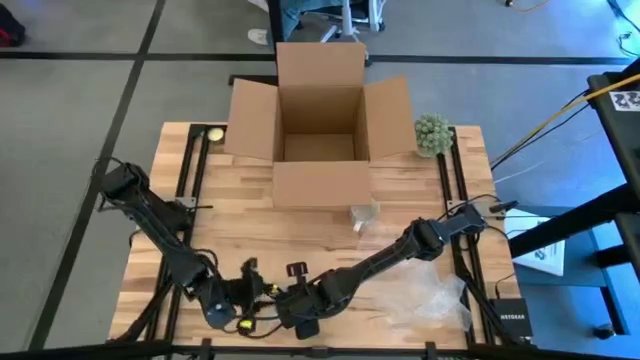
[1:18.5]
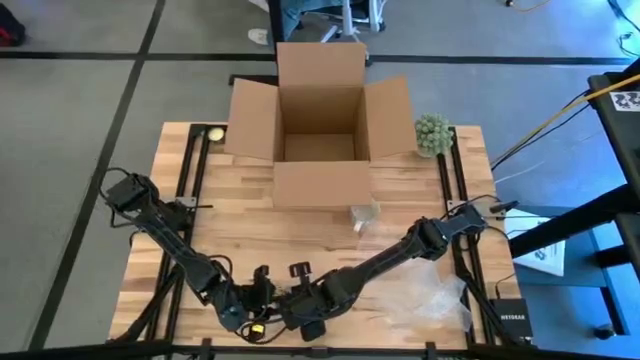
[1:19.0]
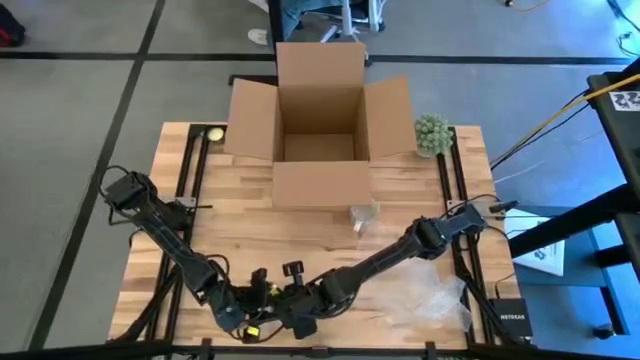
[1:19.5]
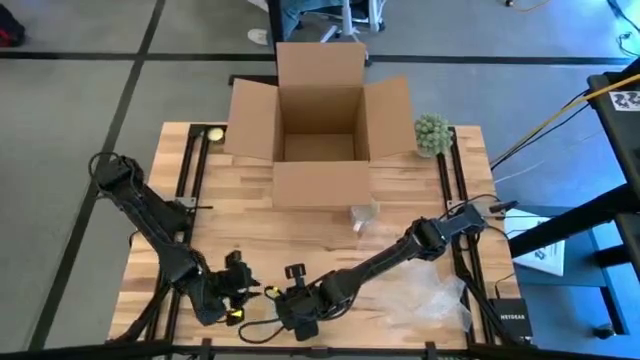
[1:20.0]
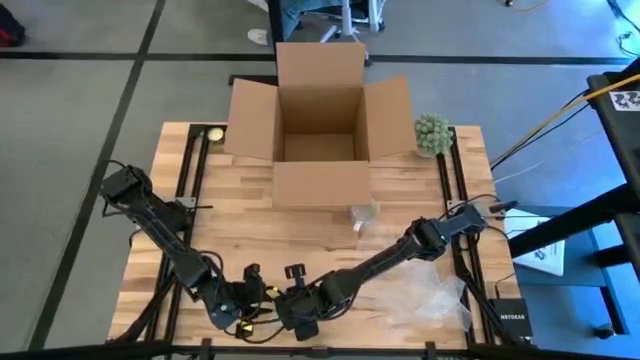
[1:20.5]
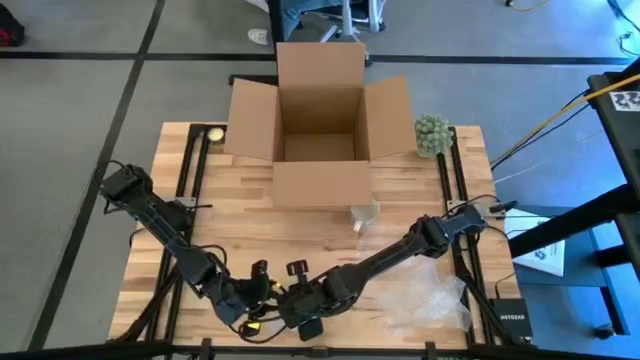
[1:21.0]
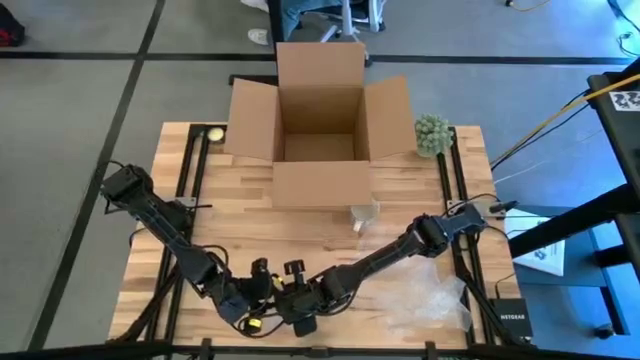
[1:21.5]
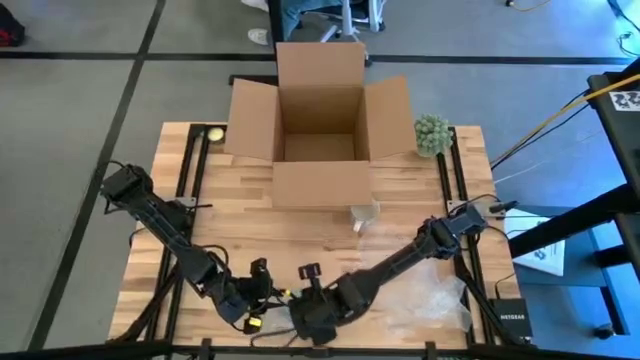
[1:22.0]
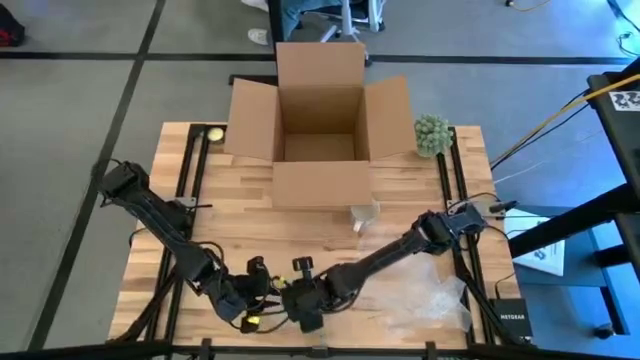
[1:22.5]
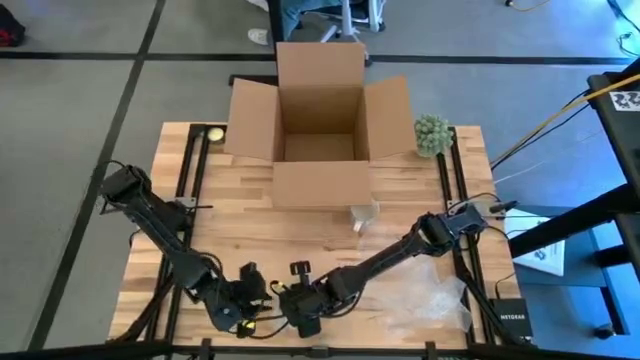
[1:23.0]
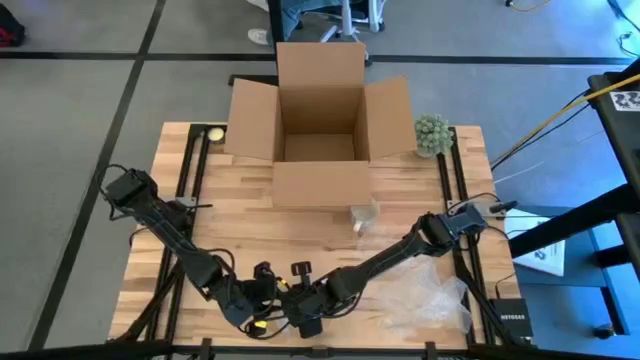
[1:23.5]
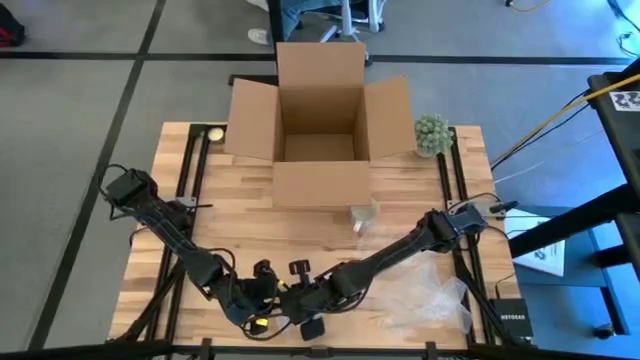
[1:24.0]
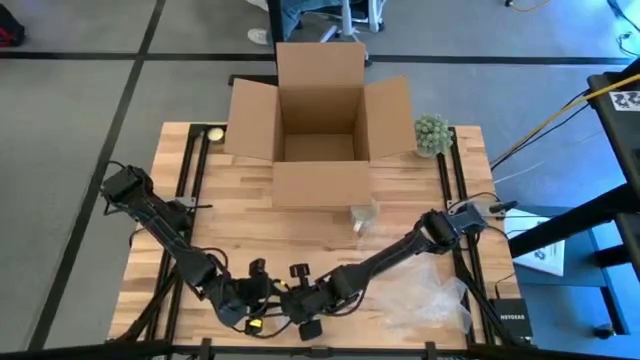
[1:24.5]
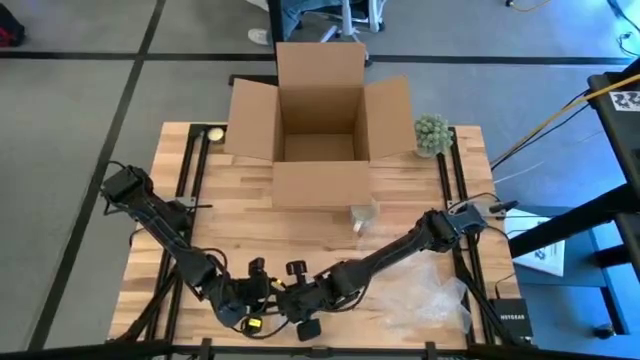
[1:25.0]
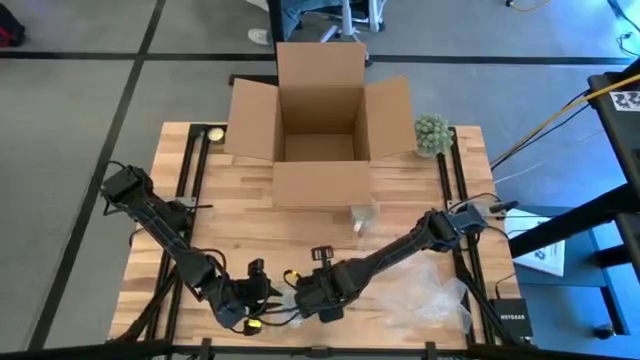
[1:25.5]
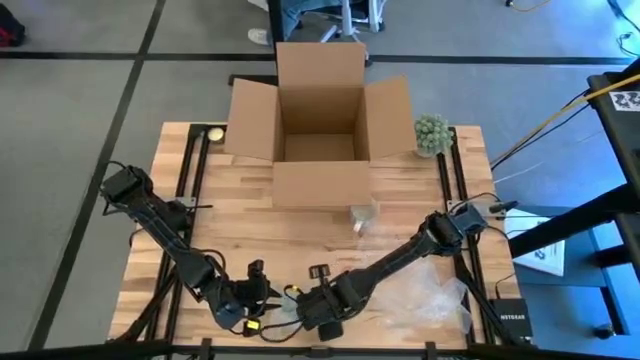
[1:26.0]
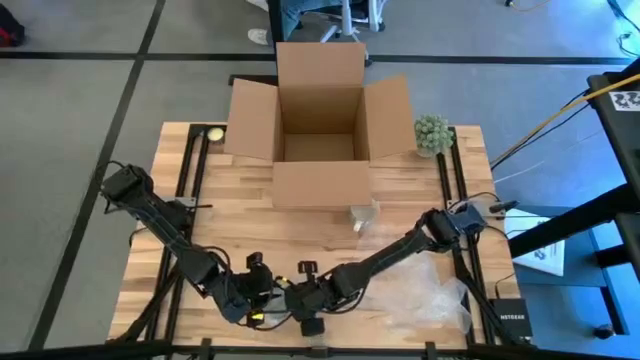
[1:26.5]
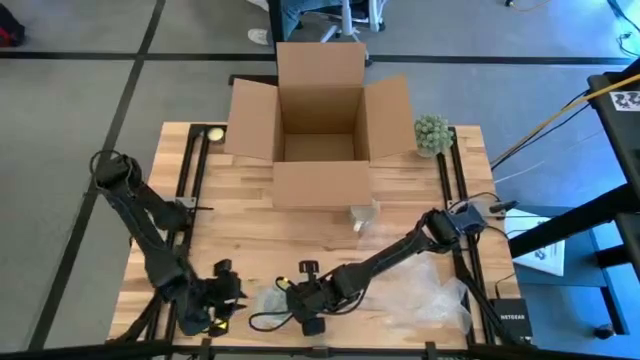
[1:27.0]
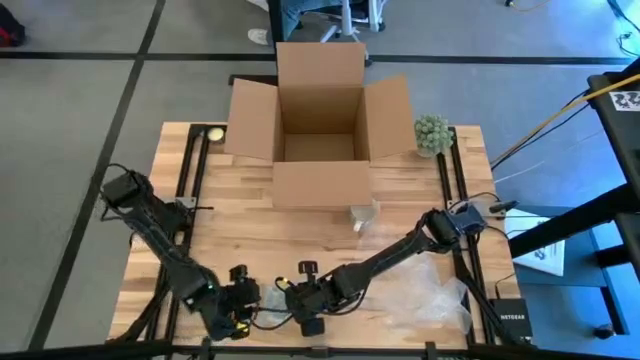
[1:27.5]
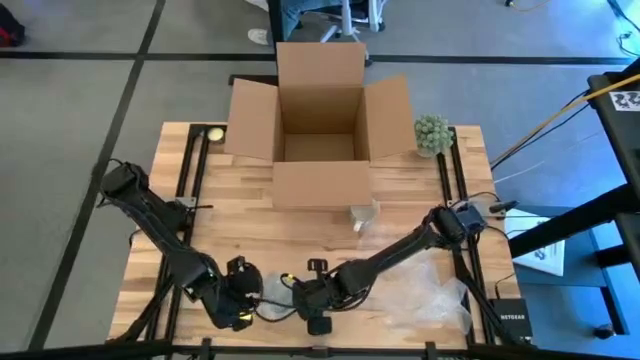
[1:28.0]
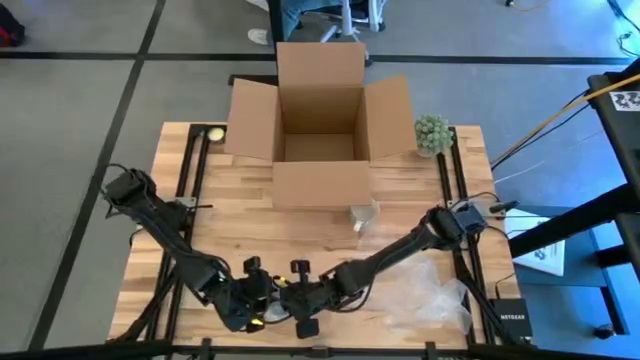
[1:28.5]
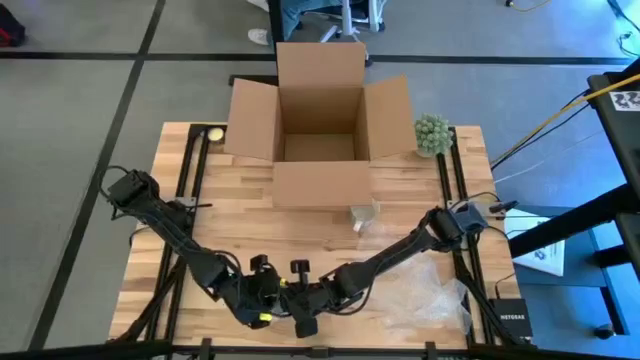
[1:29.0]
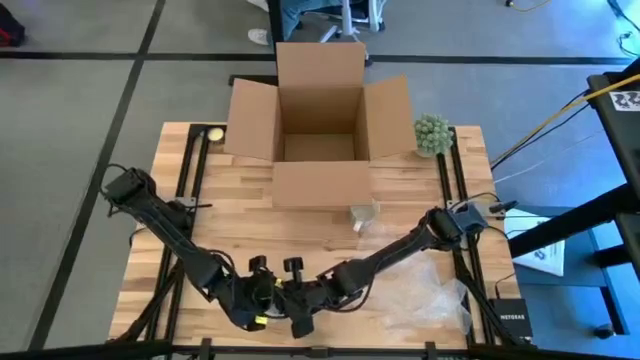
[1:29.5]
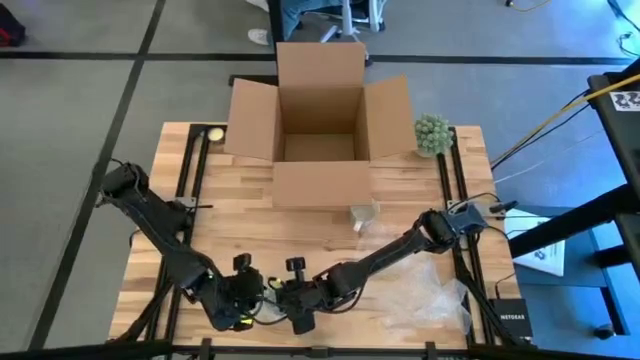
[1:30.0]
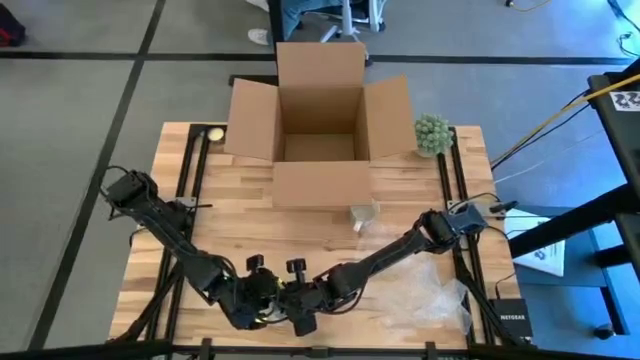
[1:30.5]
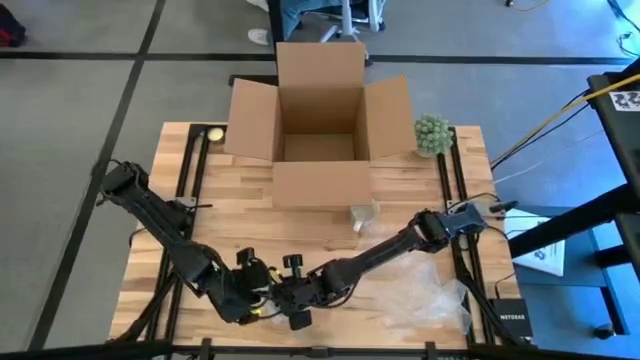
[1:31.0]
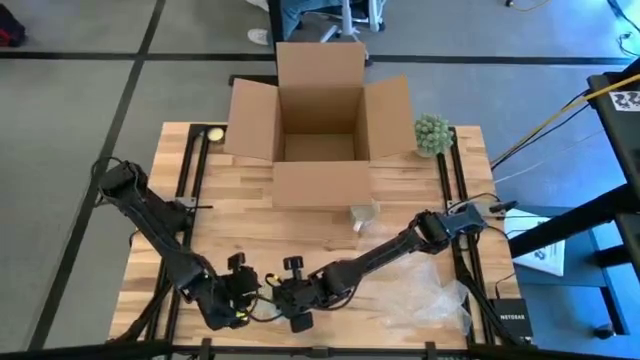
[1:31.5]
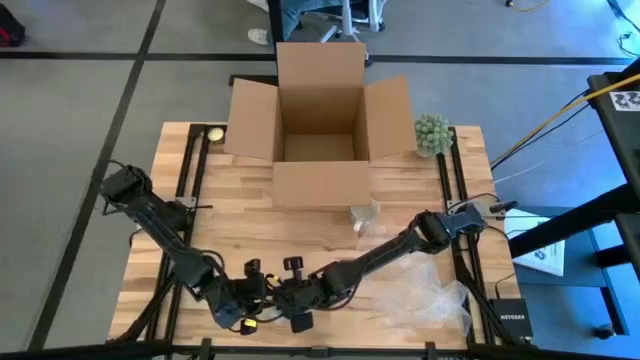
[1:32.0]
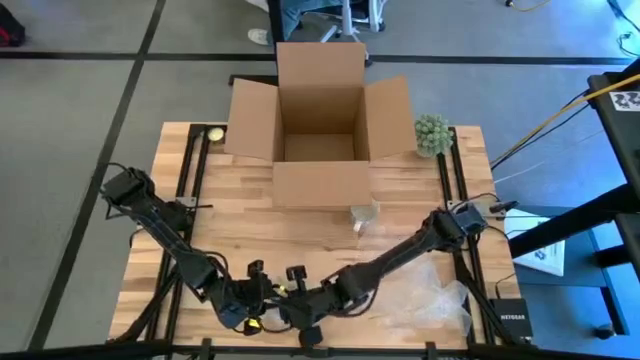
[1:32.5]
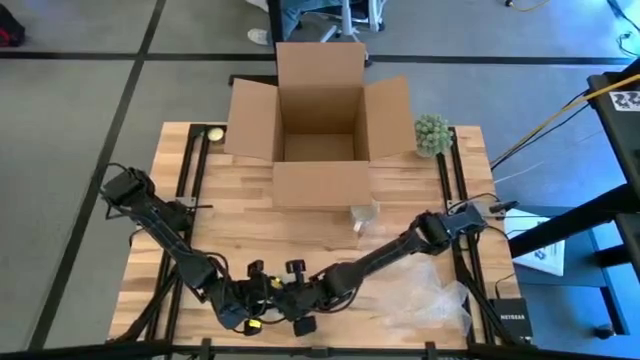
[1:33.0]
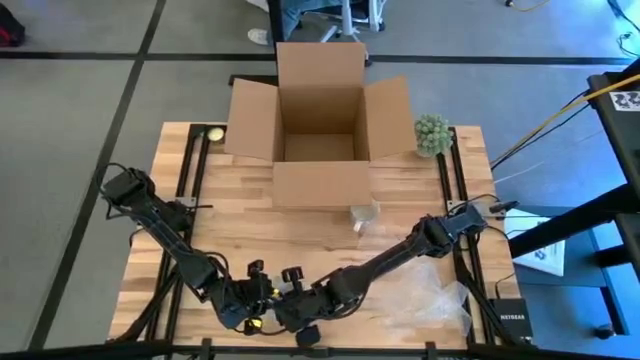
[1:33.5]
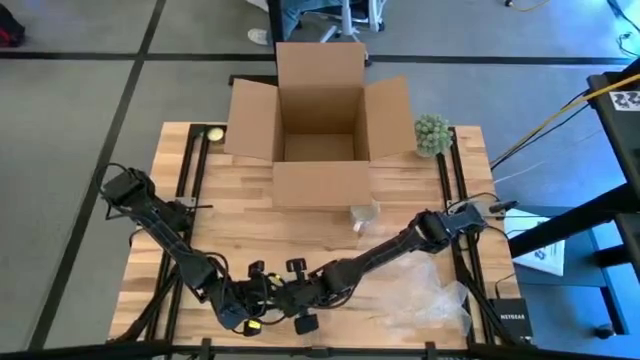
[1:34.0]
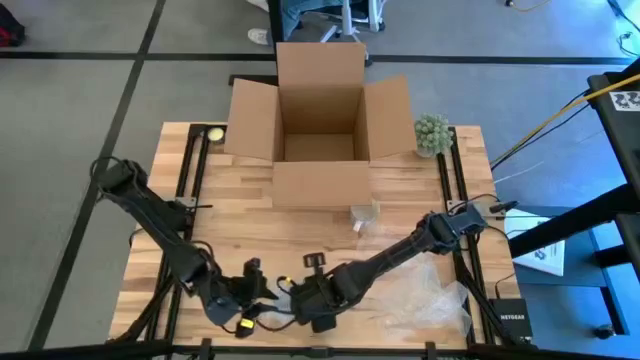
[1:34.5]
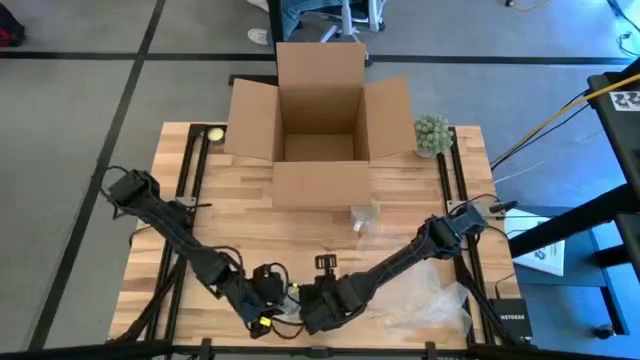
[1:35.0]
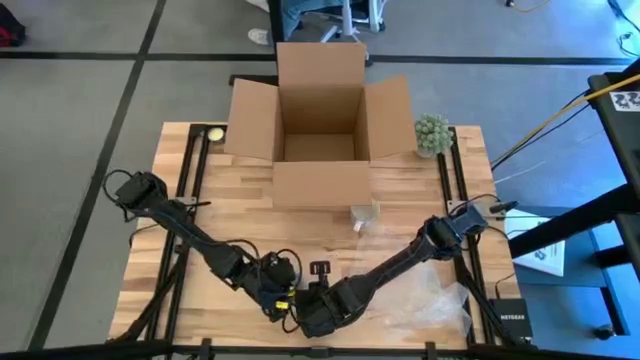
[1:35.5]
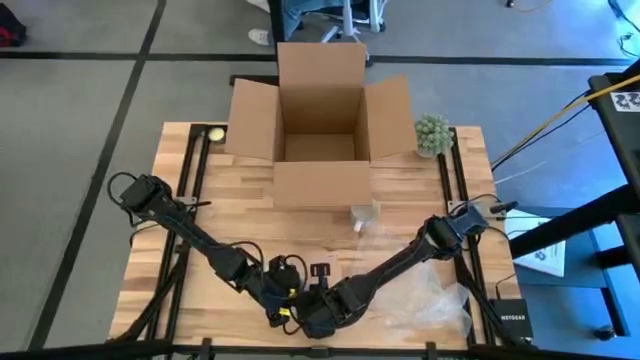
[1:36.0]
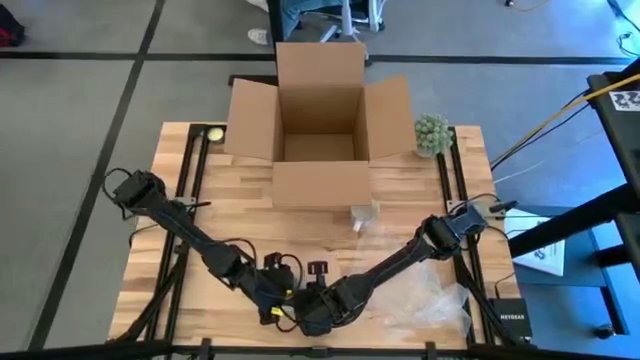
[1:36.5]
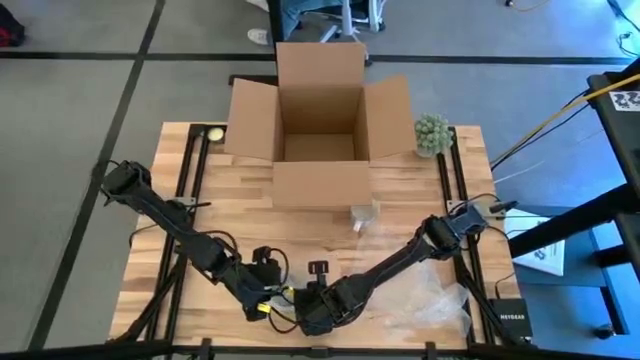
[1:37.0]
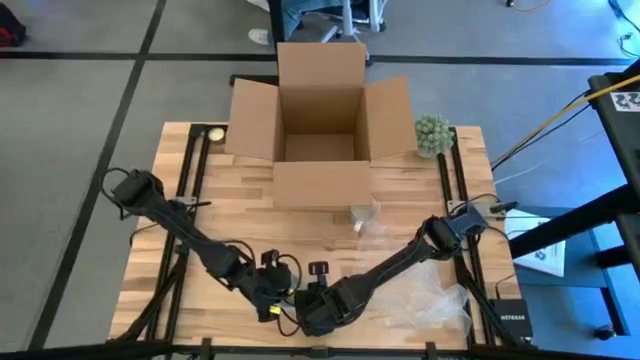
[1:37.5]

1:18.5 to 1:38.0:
Task: wrap mug
Wrap the green mug with bubble wrap

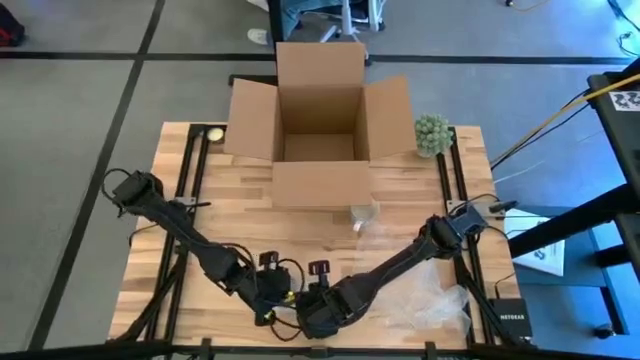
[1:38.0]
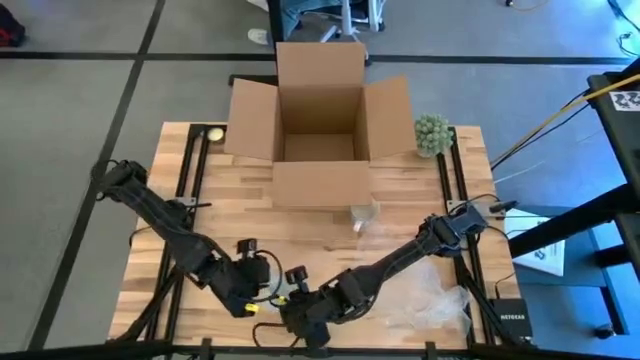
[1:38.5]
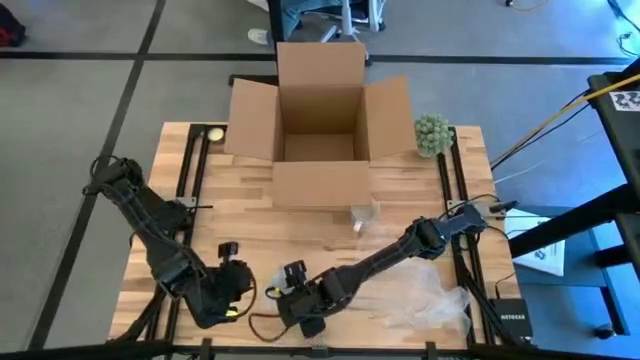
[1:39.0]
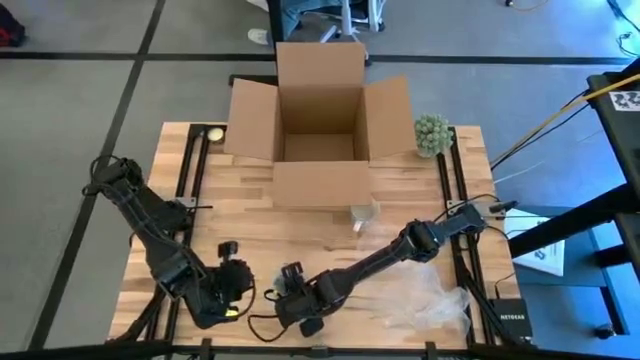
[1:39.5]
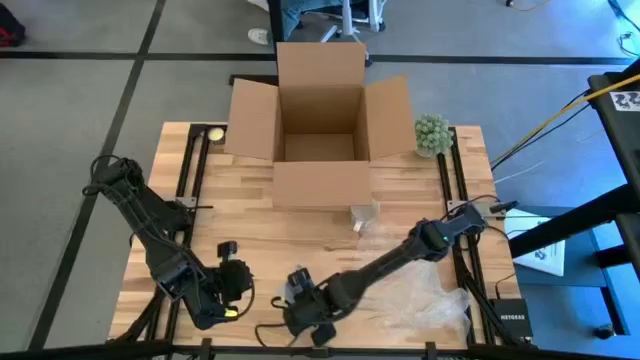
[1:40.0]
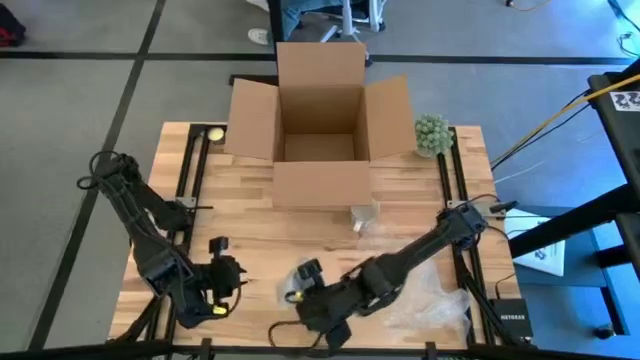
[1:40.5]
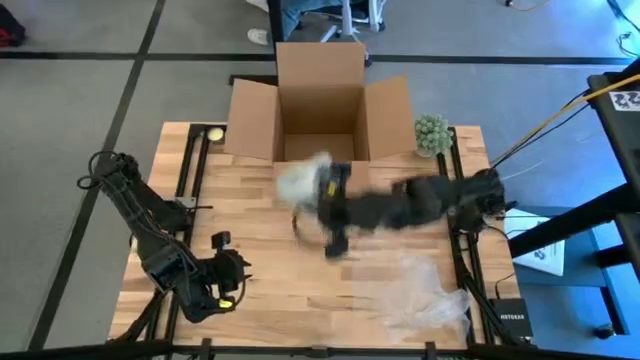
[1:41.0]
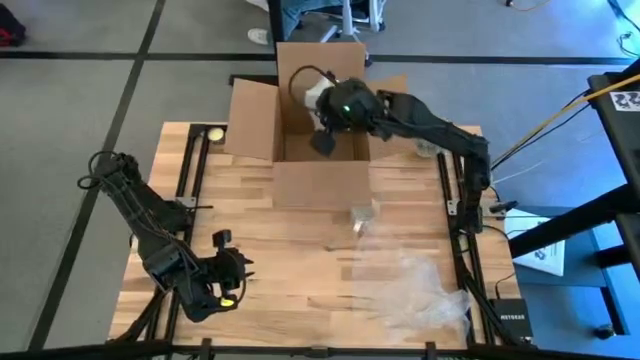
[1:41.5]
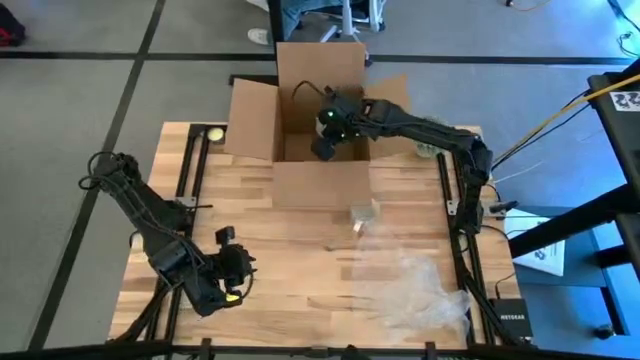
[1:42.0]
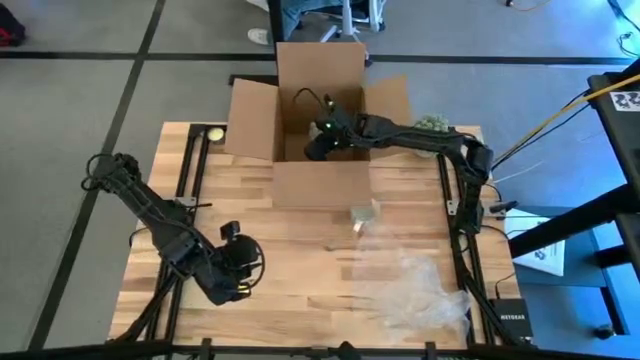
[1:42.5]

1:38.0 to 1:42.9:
Put the wrapped green mug into the box
